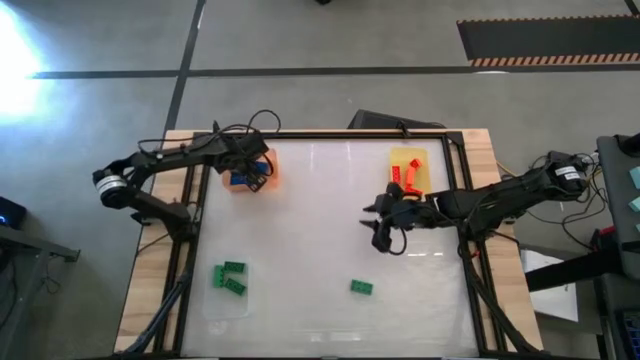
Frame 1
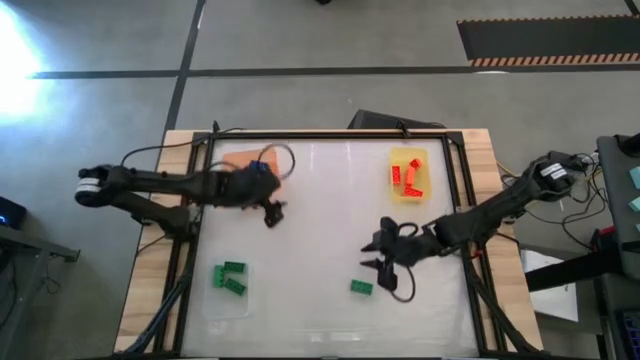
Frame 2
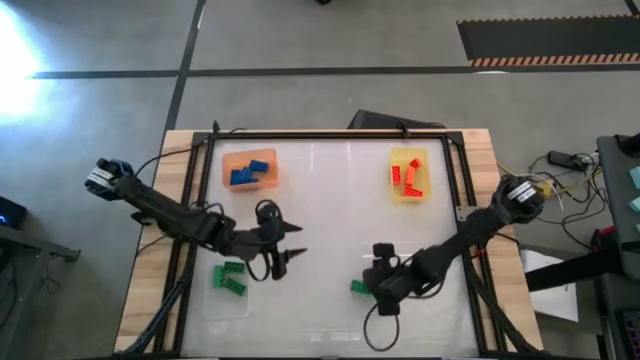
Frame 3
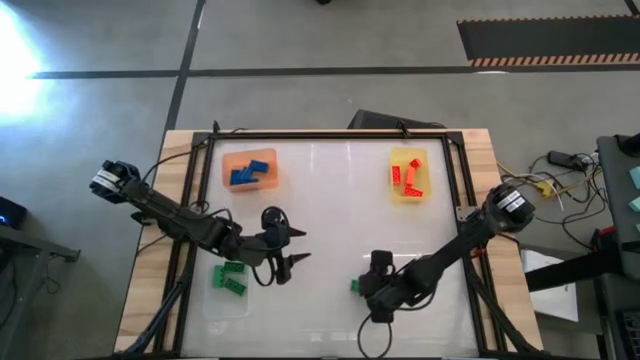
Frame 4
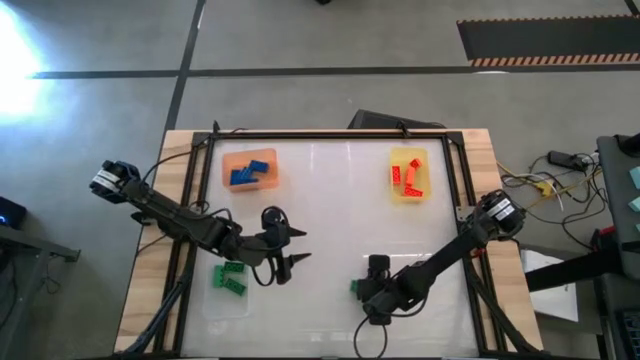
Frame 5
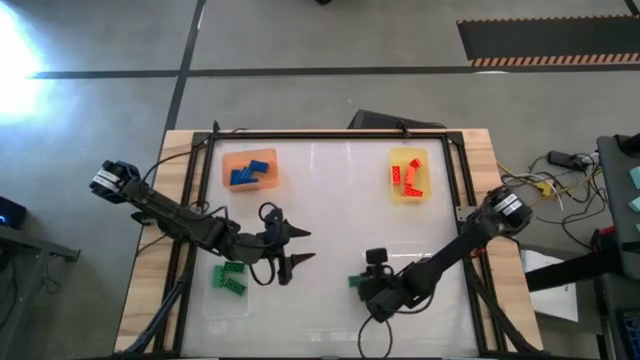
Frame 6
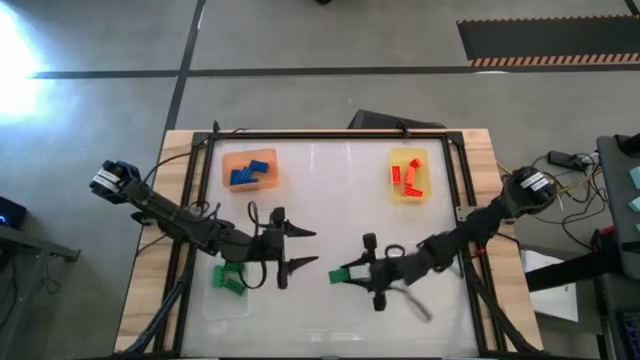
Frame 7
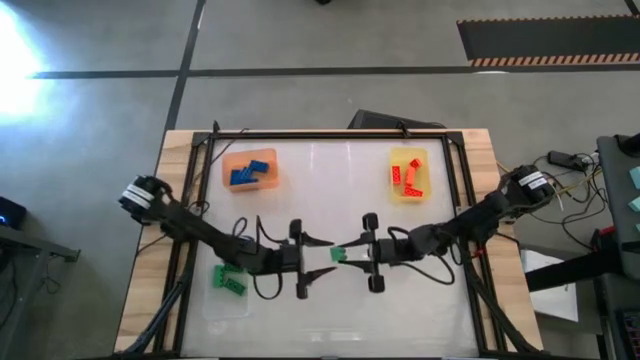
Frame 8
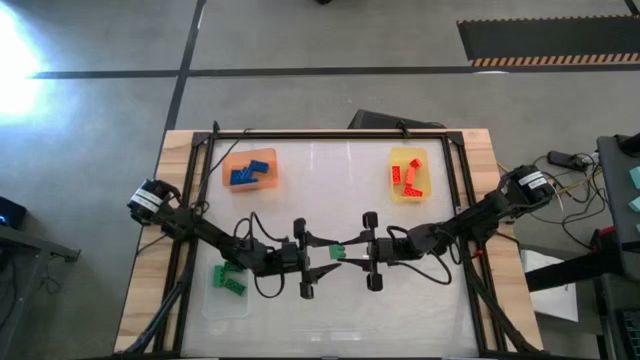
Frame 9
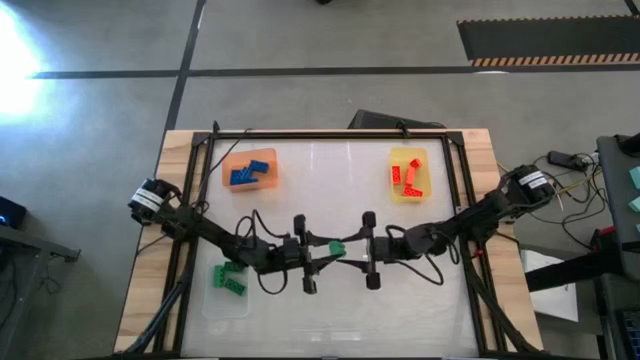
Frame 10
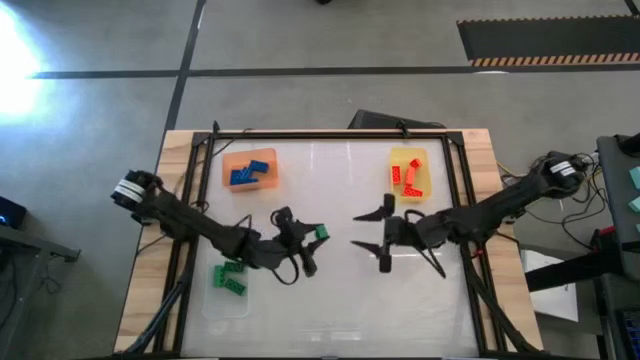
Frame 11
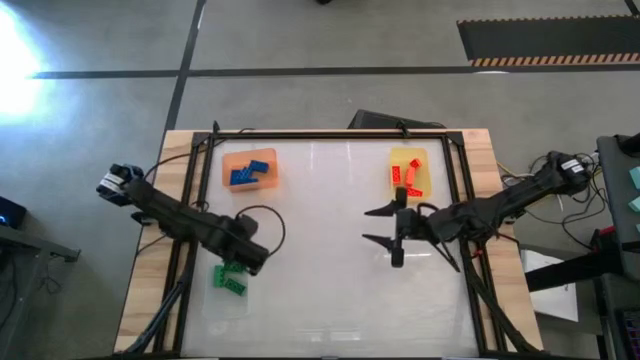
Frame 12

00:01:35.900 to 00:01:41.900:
Task: Sort & place blocks by color
Put the green game piece into the white bin

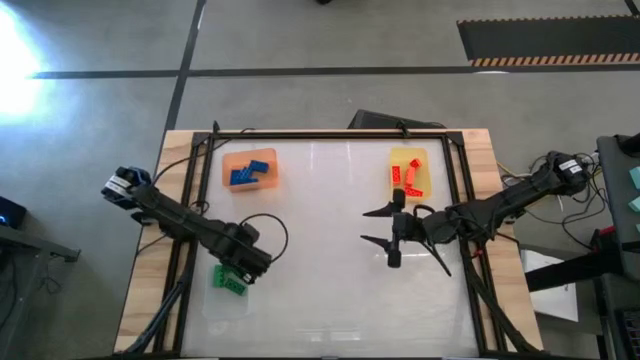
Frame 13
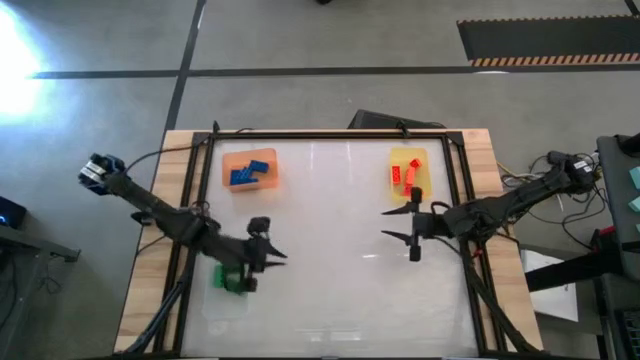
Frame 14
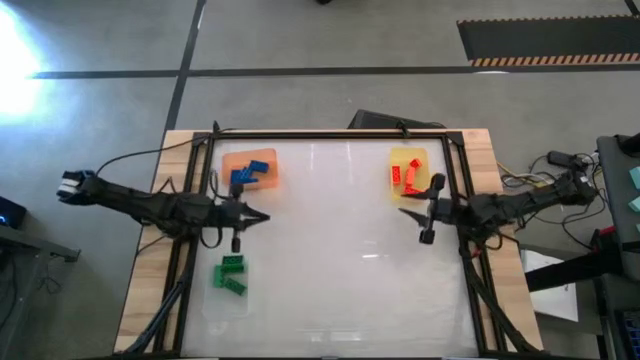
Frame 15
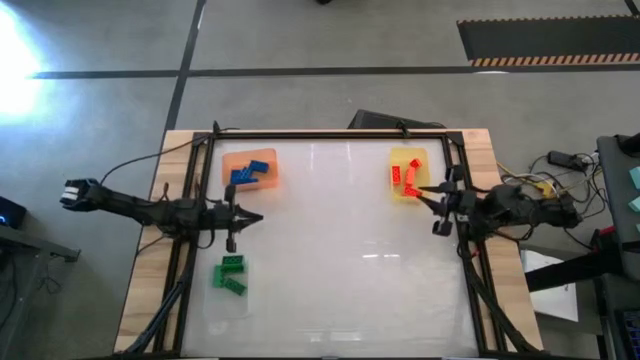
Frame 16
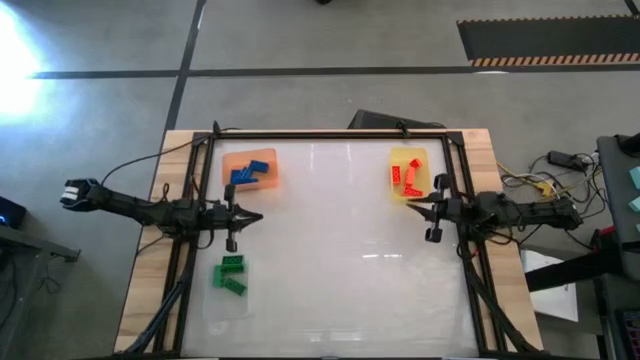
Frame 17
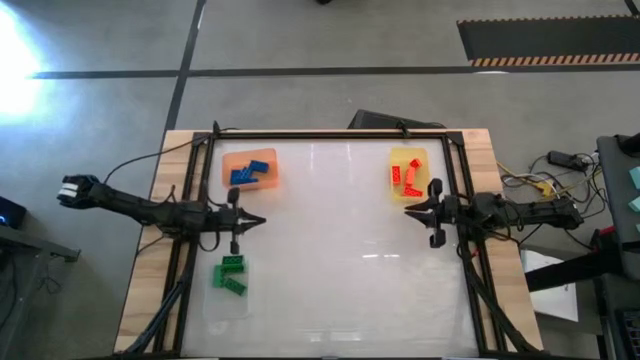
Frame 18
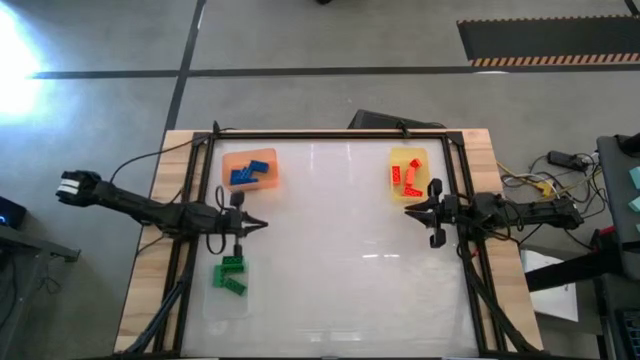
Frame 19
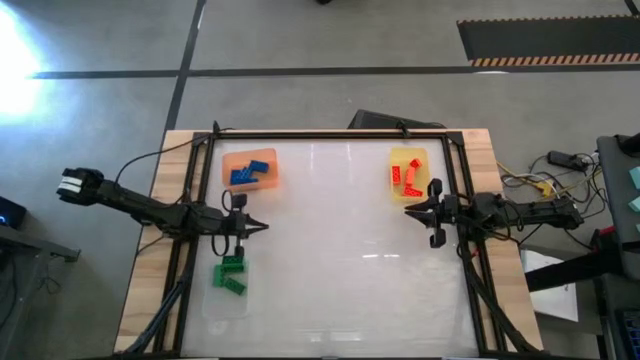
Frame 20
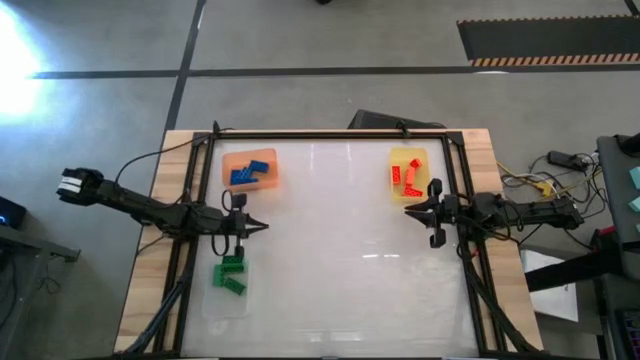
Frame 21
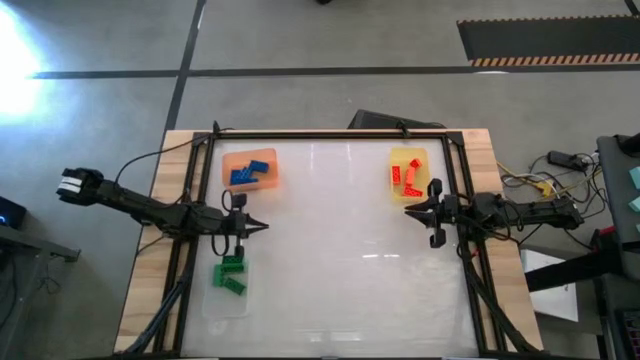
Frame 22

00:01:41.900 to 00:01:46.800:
Return to Home Position

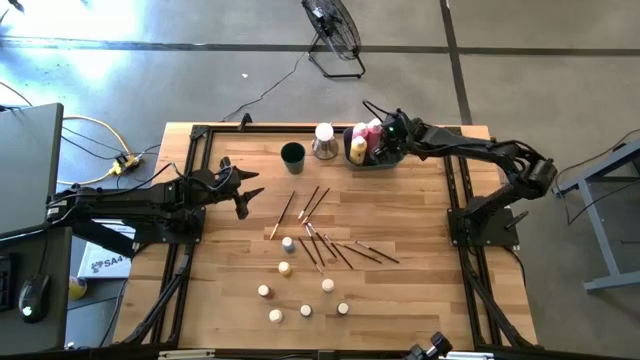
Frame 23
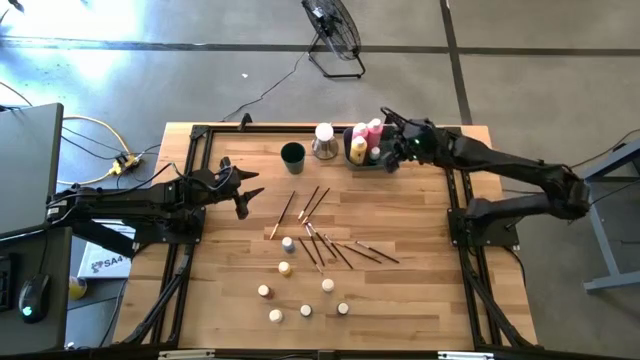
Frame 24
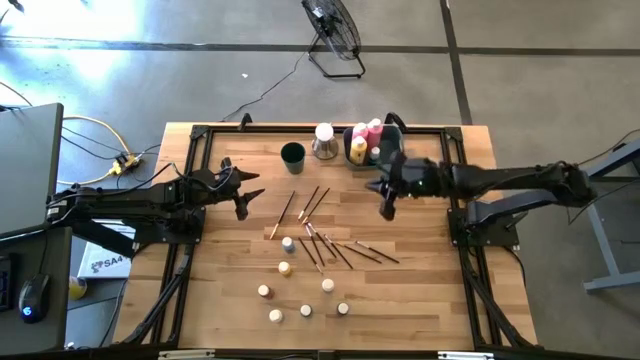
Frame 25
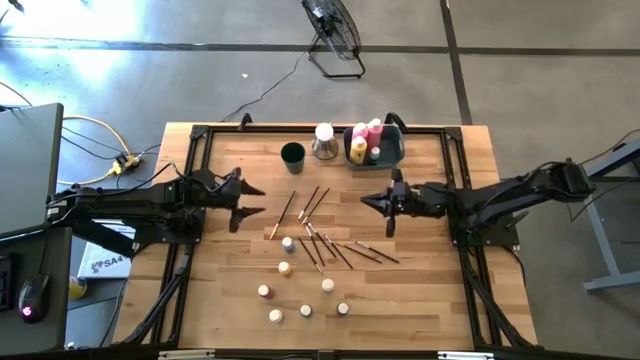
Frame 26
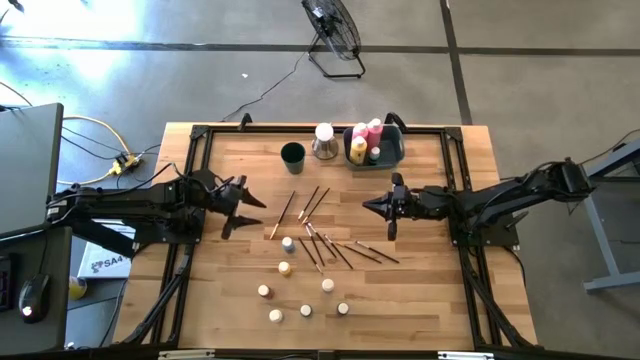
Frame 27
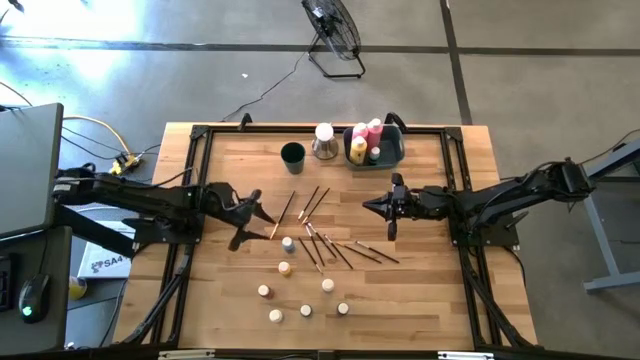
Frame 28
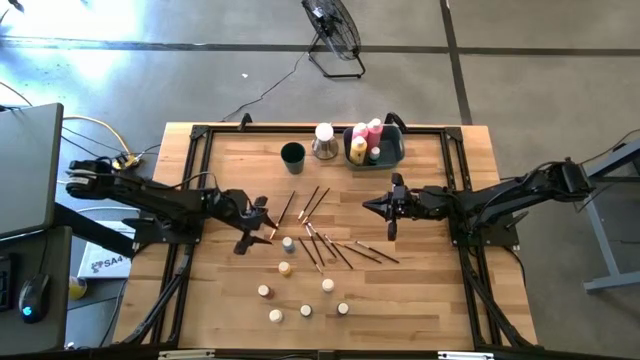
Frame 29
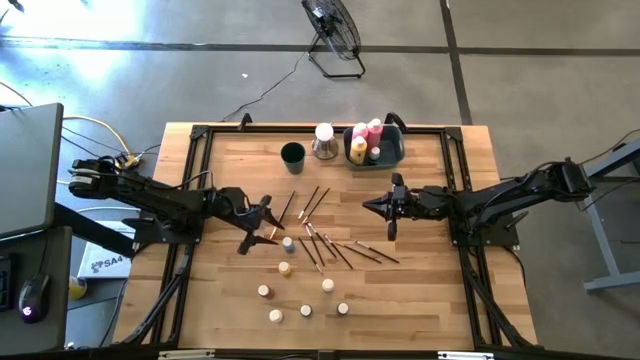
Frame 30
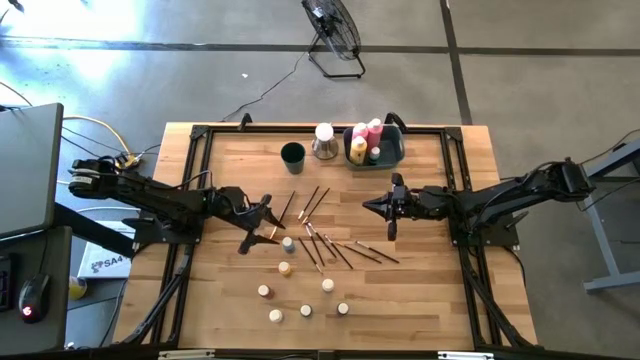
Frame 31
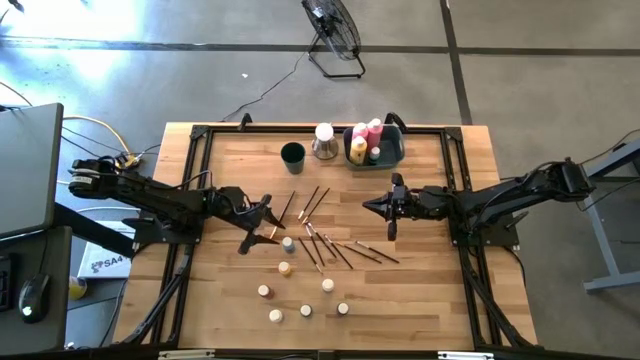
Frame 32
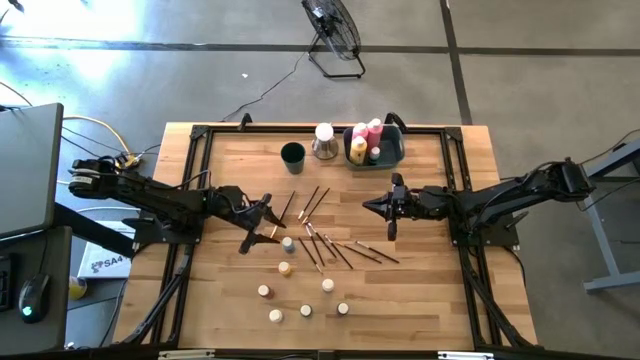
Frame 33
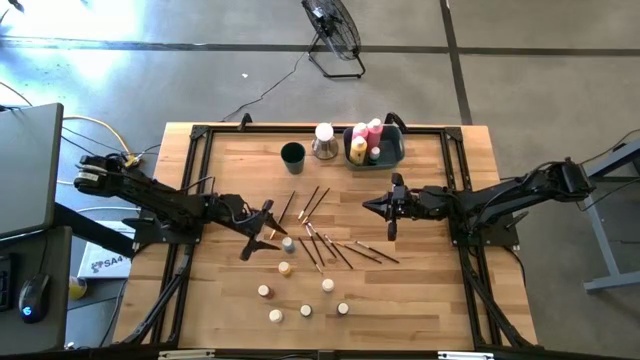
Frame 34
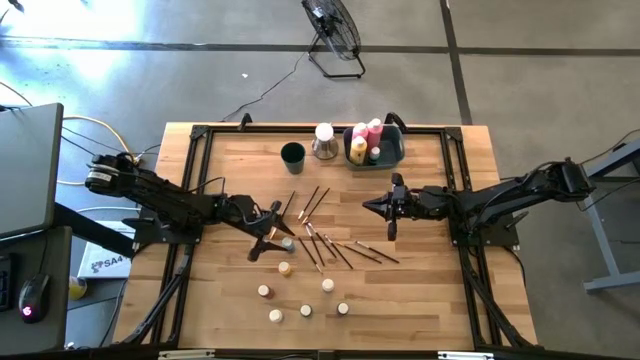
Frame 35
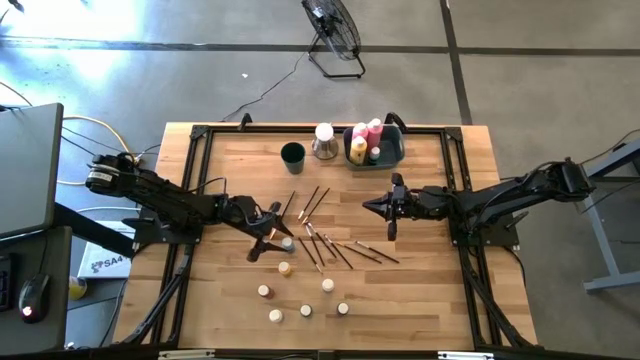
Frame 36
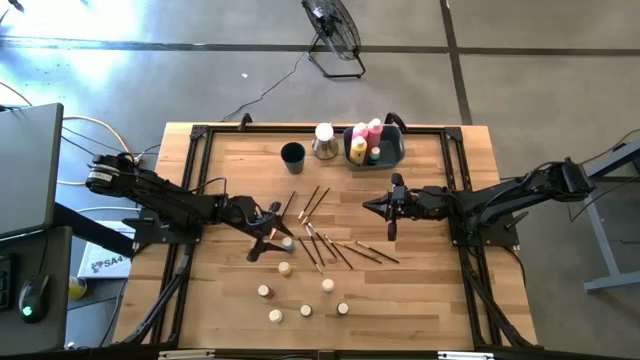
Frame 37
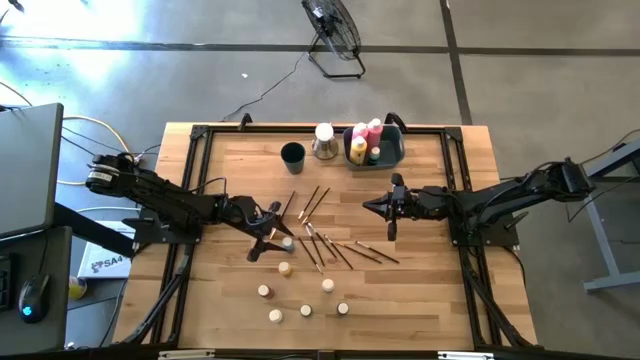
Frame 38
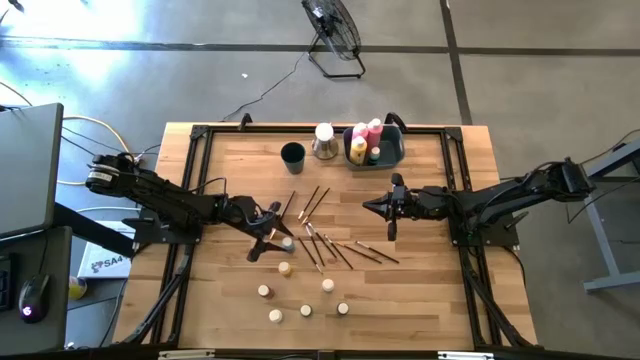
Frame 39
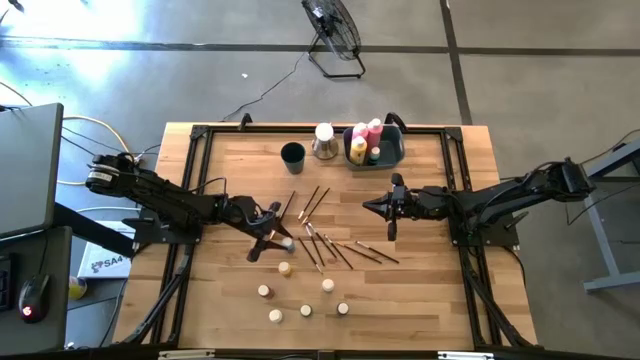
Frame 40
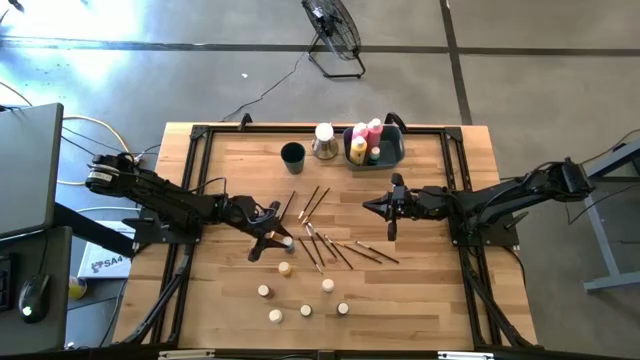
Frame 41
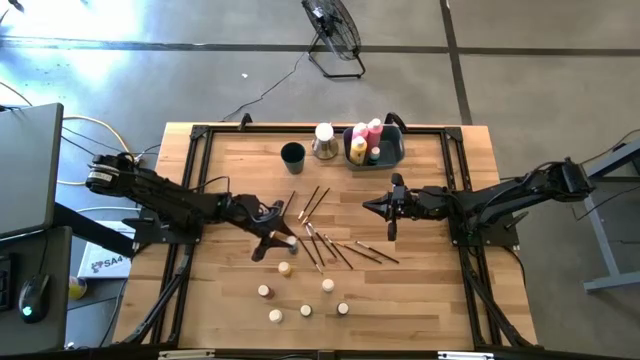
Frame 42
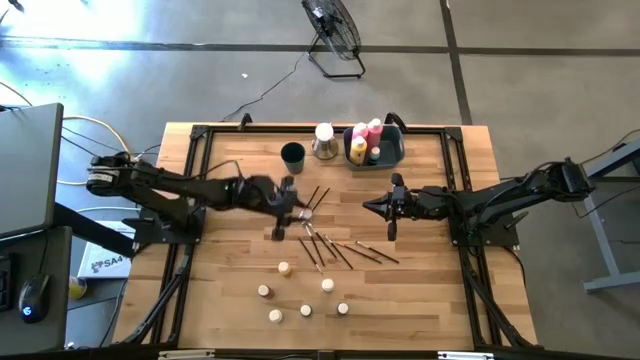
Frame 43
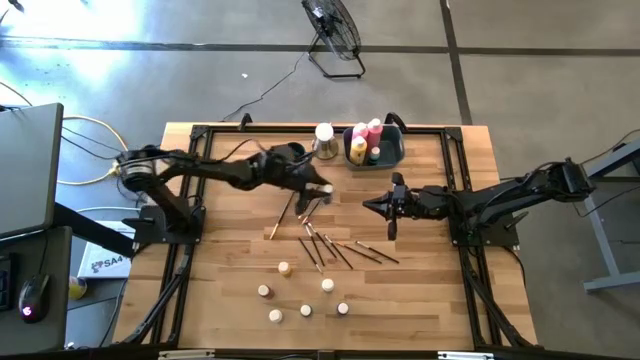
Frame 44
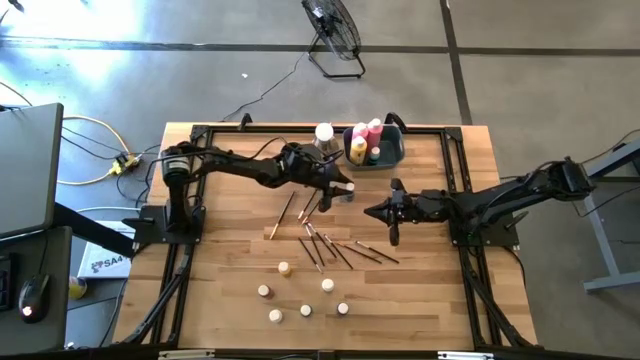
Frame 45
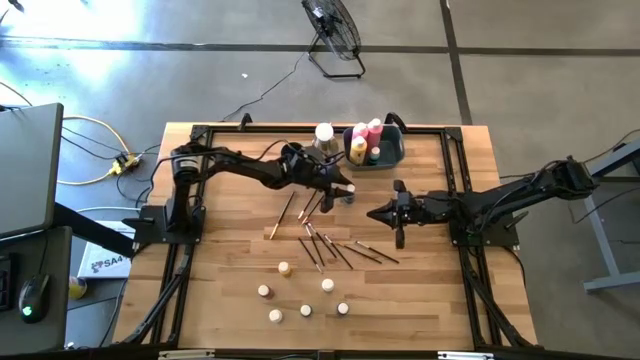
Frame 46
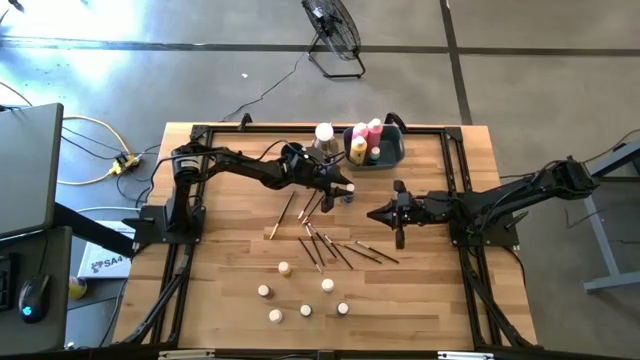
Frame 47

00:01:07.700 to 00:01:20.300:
Task: Pick & Place Paint Supplies
Put the small light blue paint bottle into the blue bin
